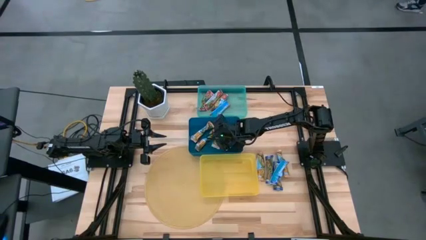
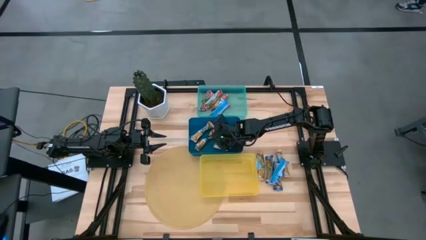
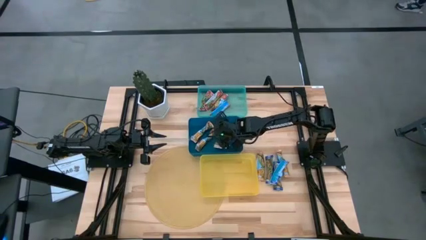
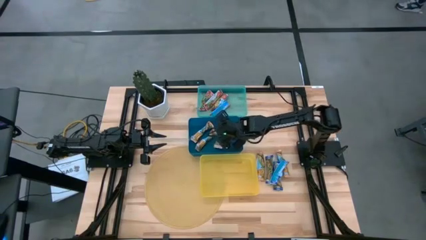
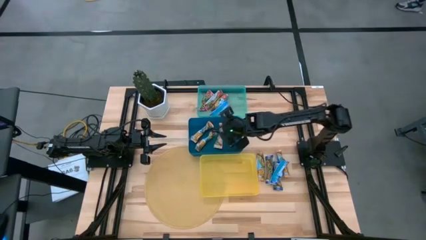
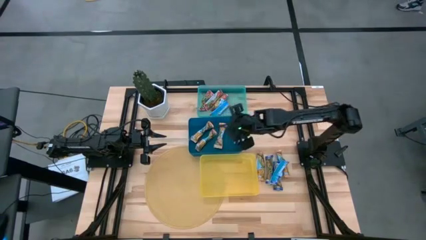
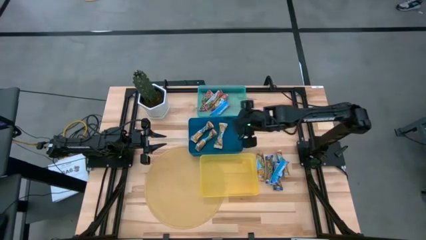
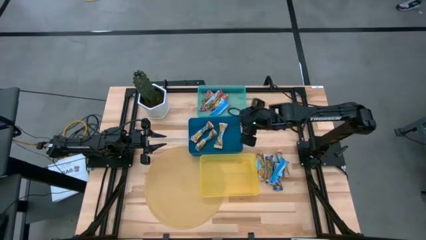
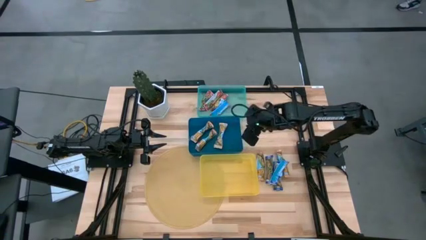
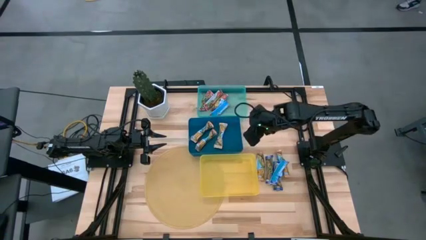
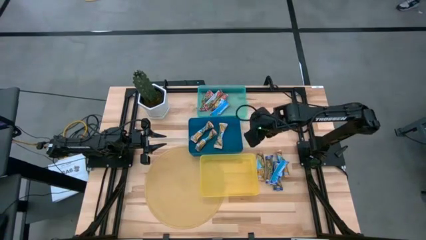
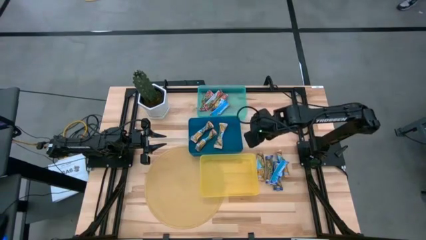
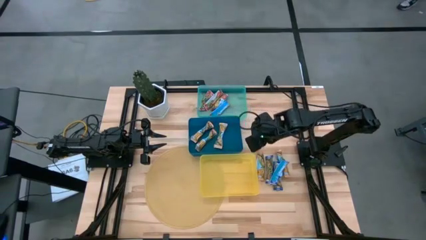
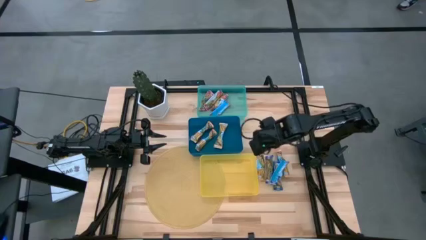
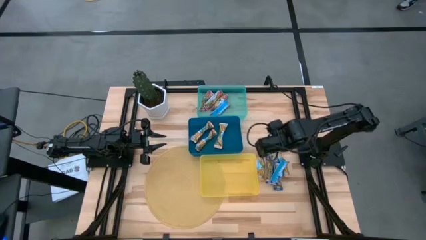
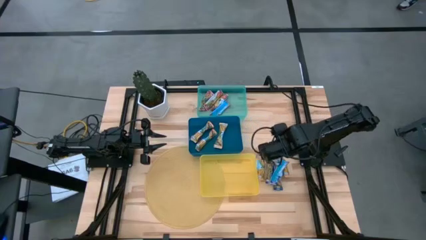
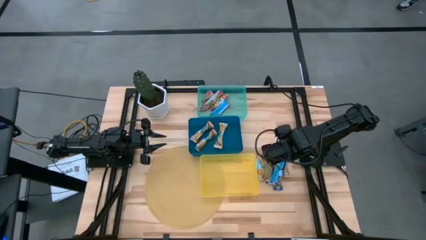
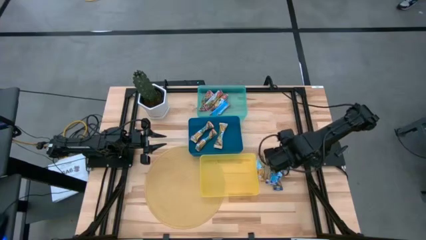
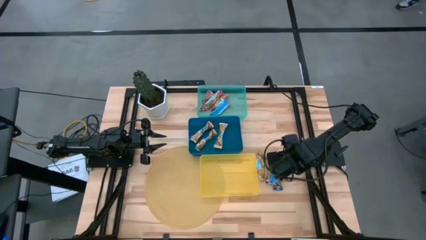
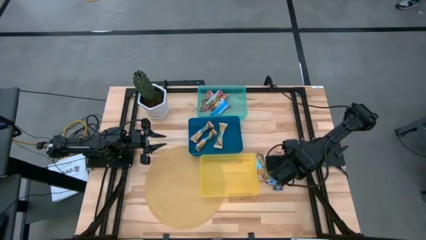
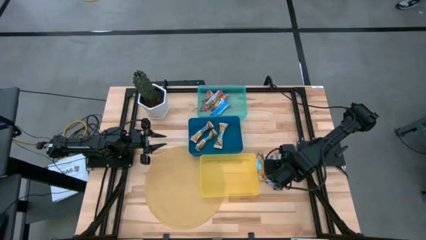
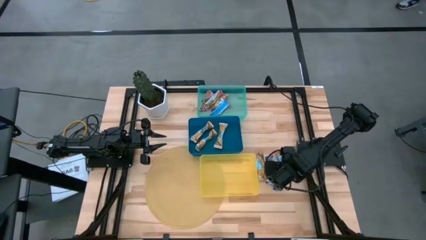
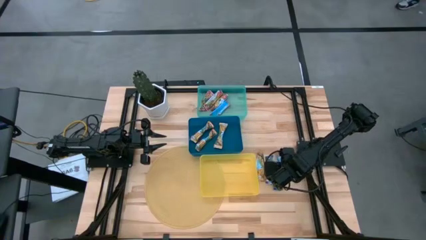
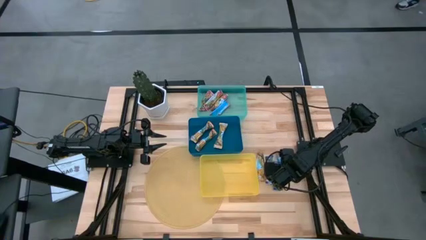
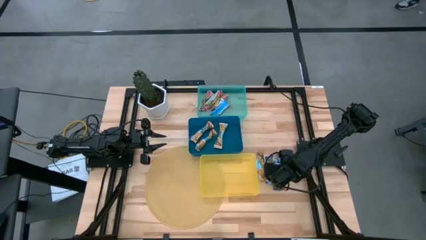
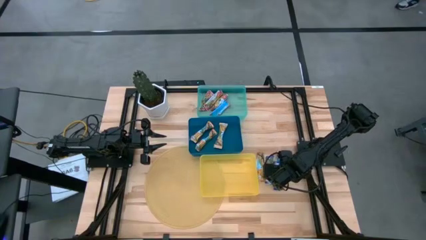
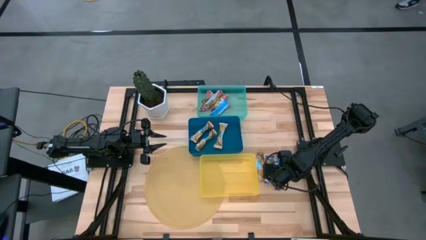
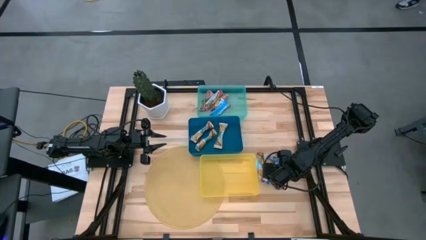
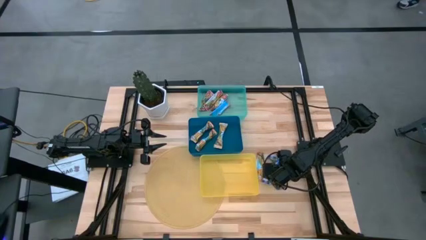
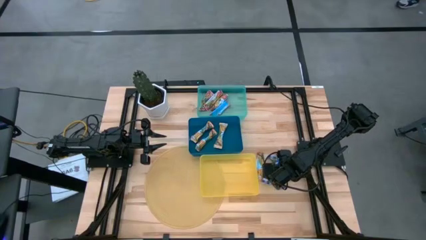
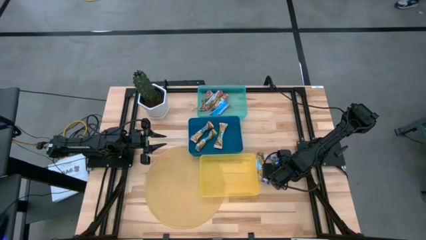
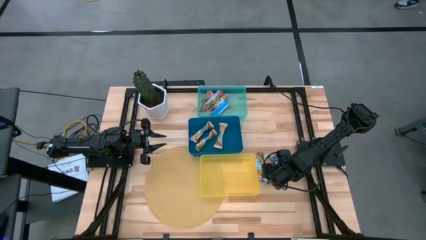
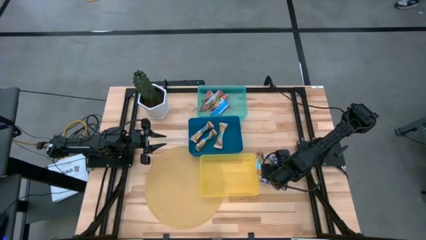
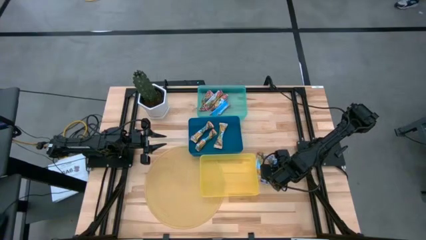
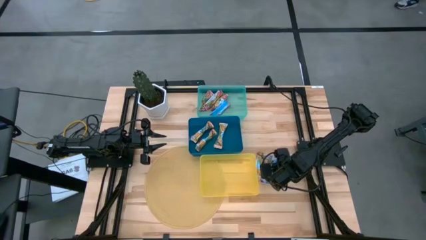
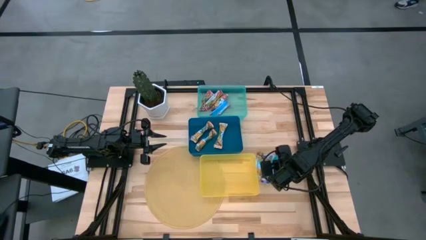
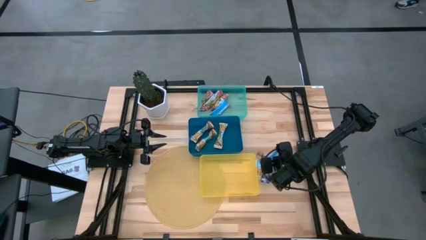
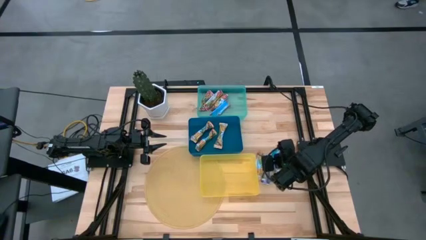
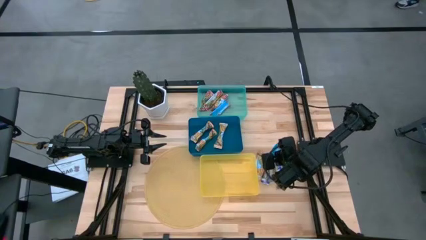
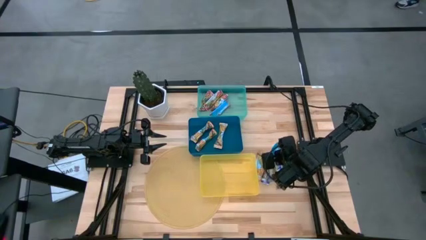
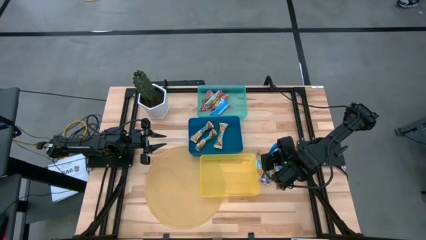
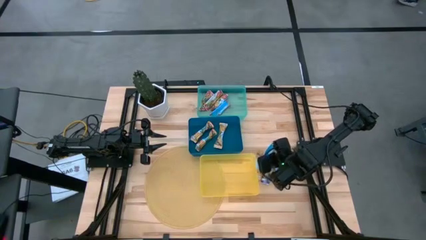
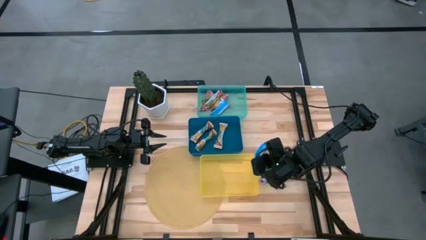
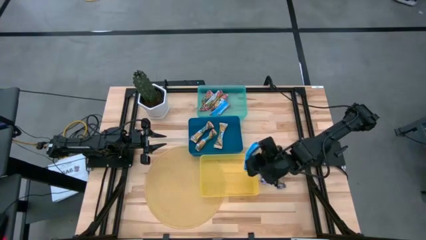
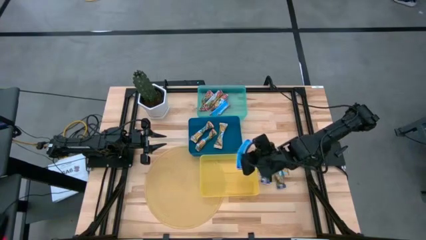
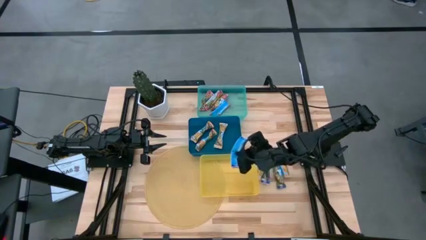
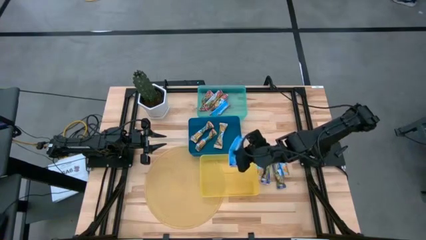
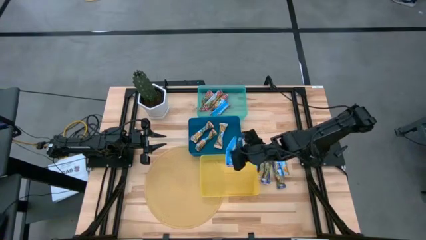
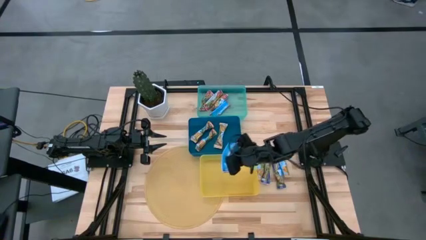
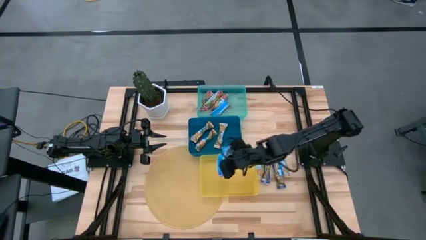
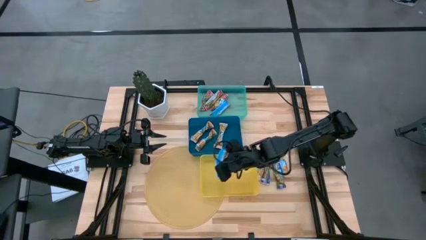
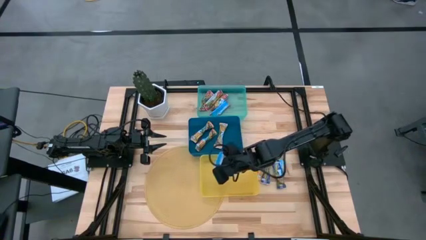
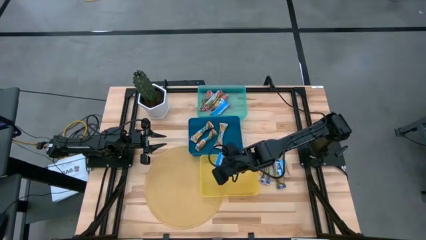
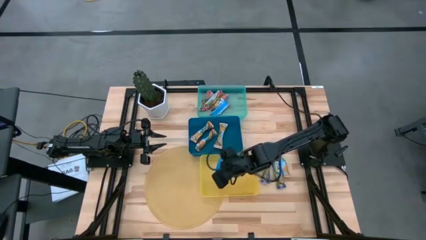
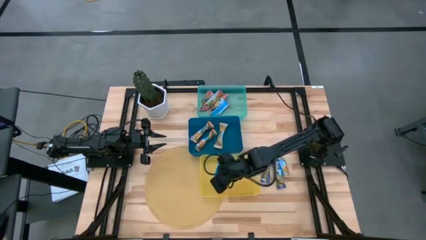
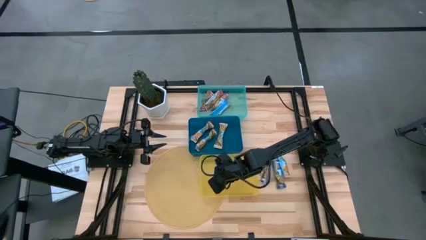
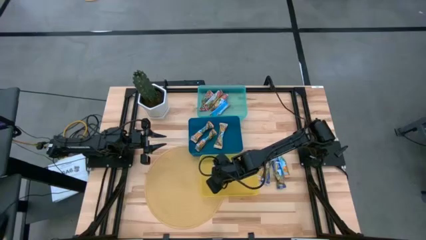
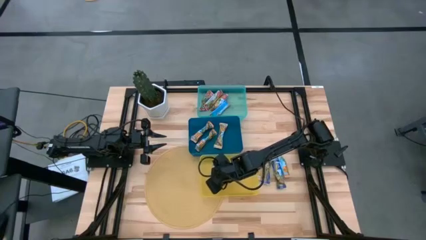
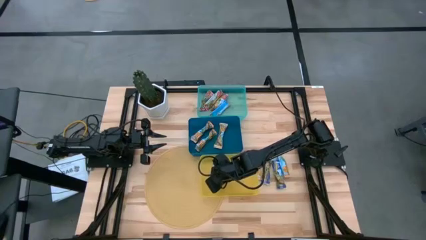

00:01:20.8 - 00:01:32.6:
Task: Pick and place Granola Bars by type
Put the blue granola bar into the yellow bin

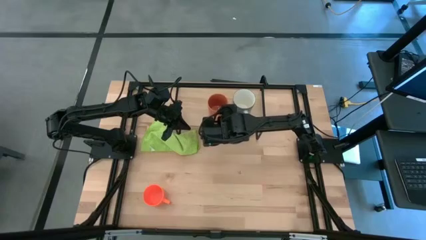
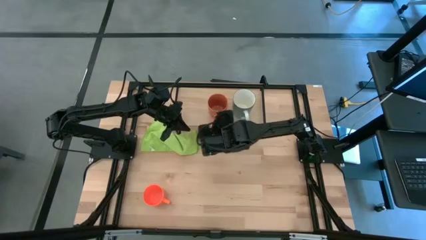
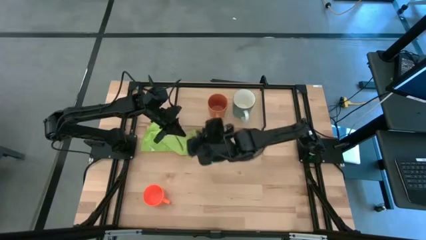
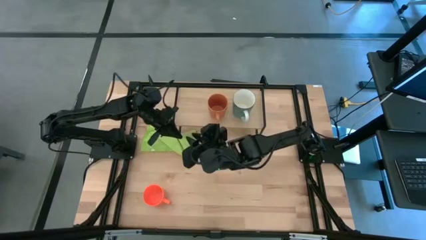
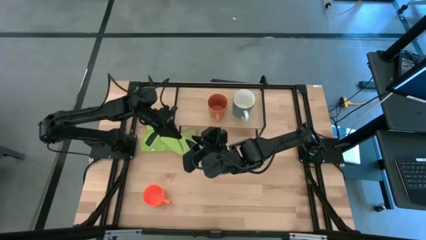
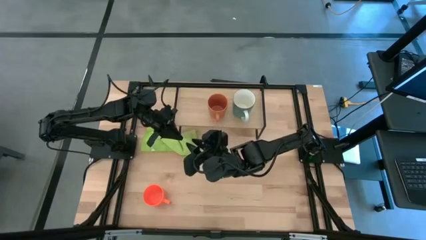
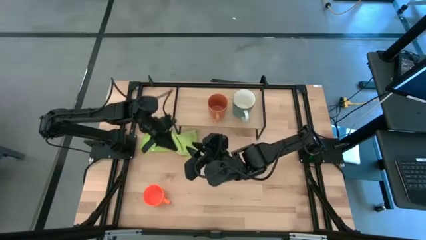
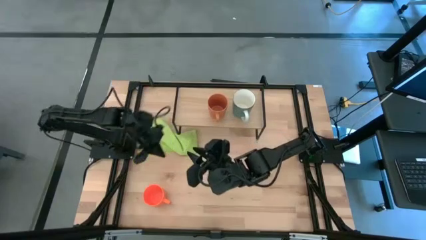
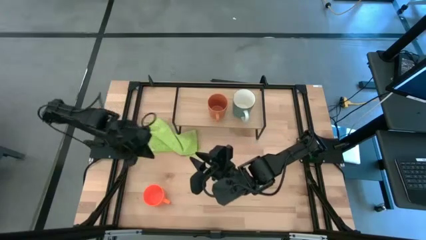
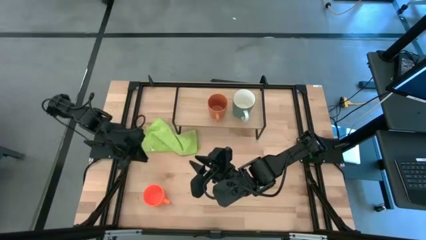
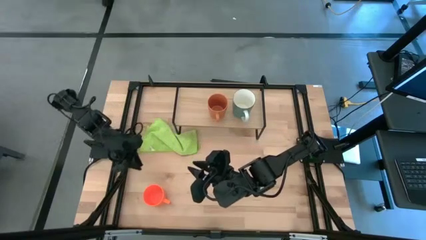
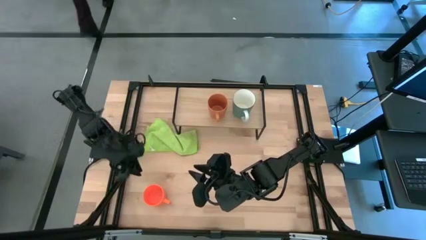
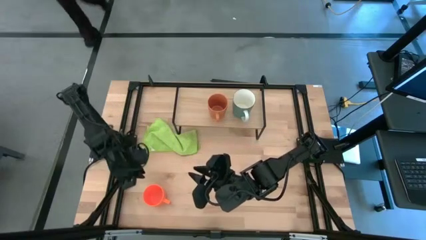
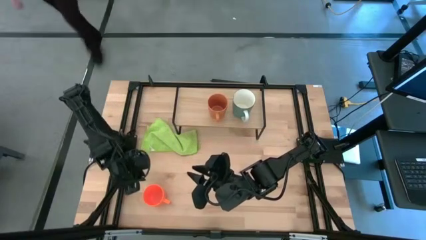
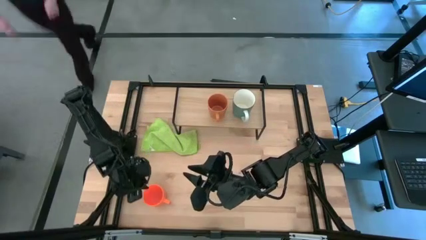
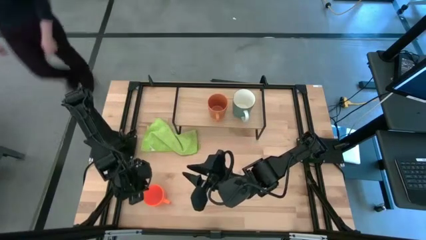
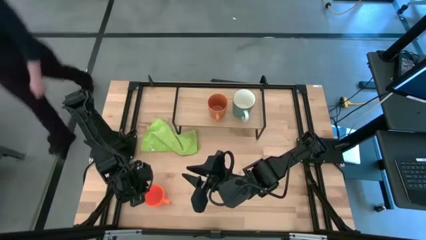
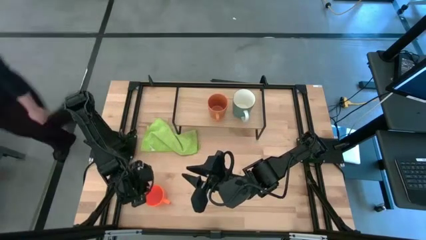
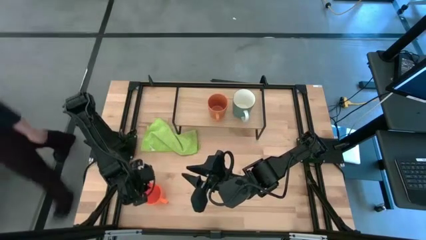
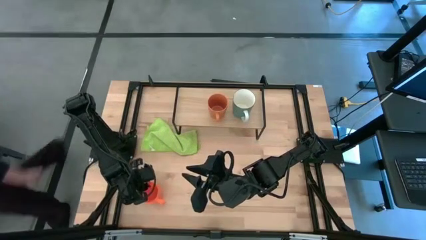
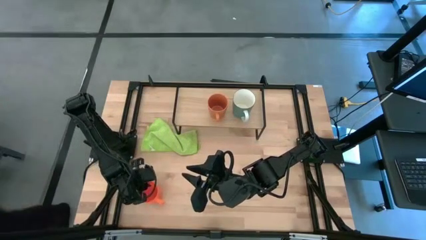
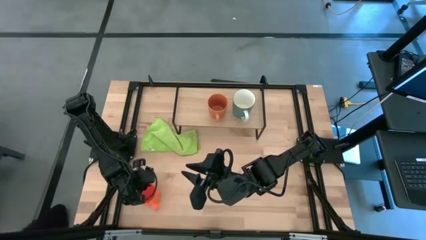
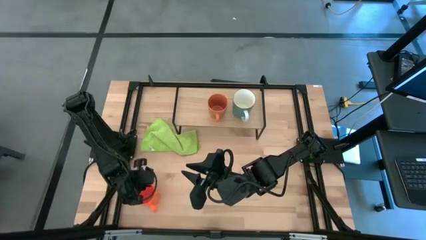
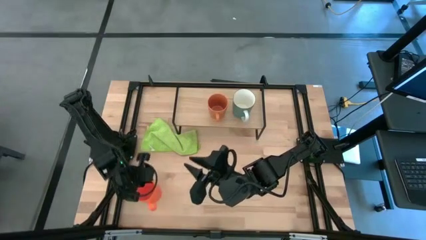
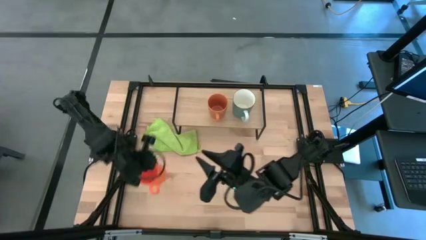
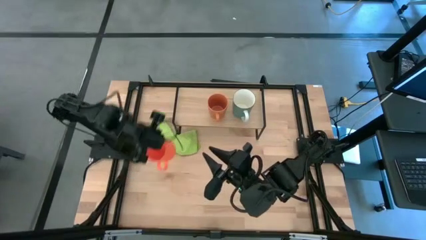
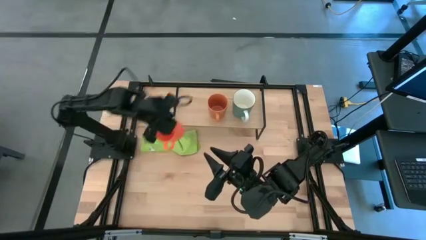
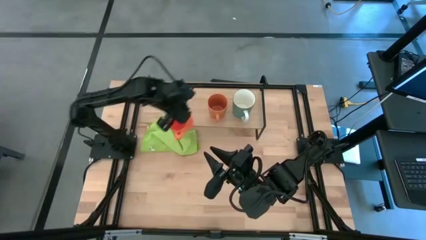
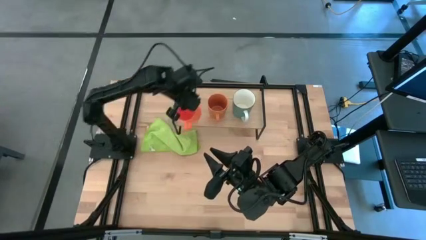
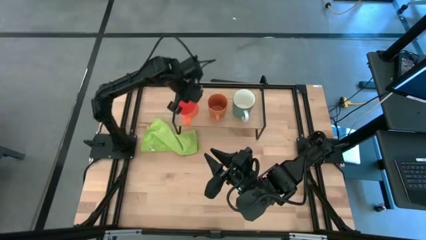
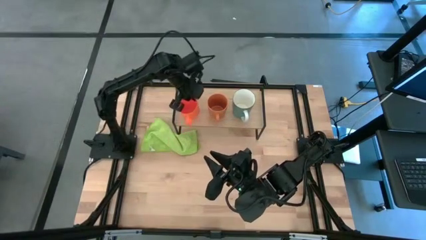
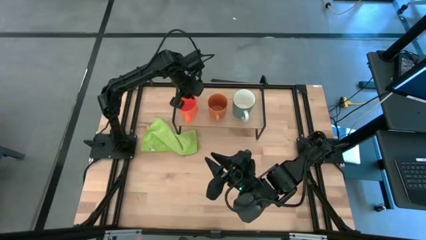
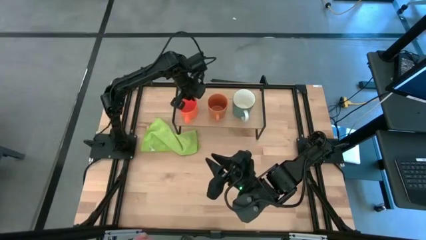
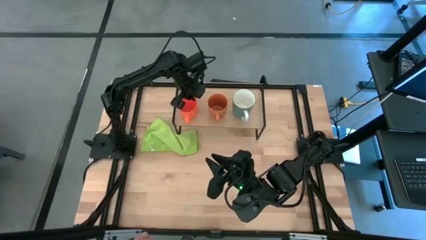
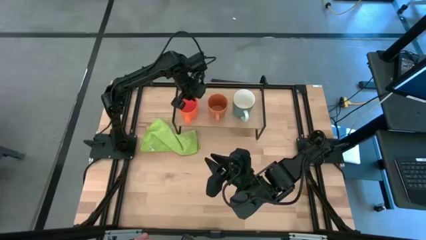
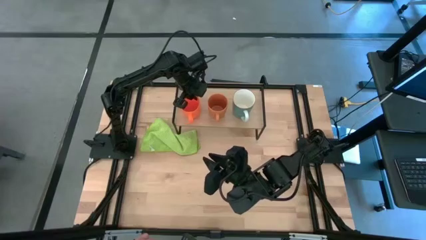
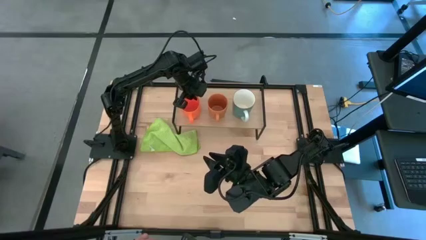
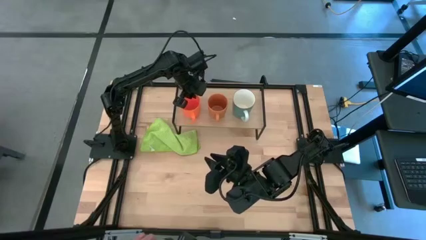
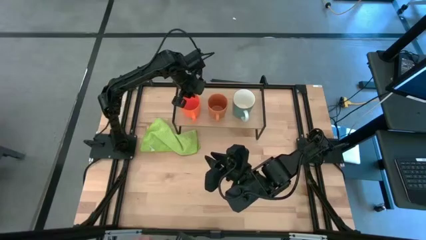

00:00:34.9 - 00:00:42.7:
Task: Stack small to large cups/mugs on shelf
Put the orange mug on the shelf
